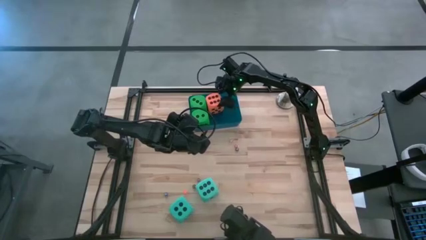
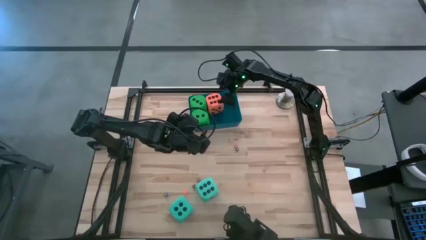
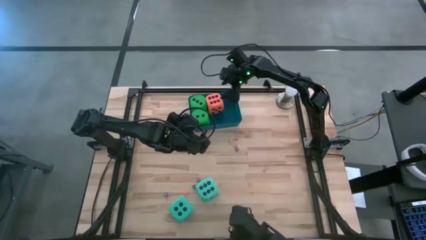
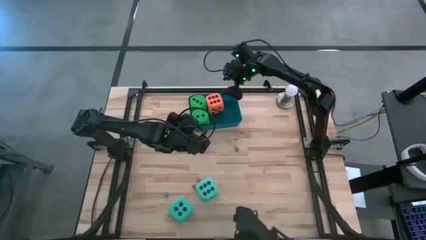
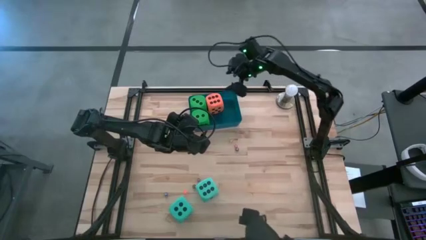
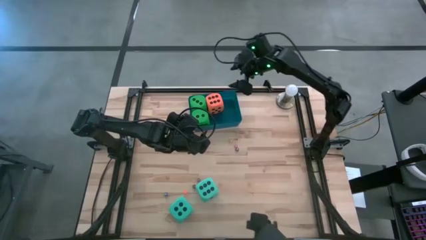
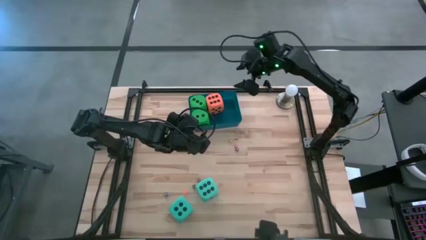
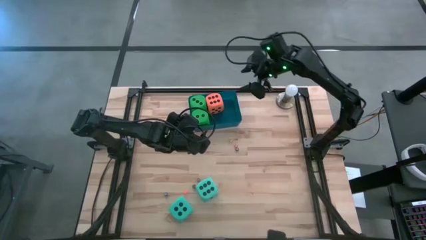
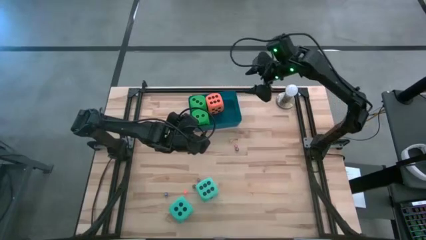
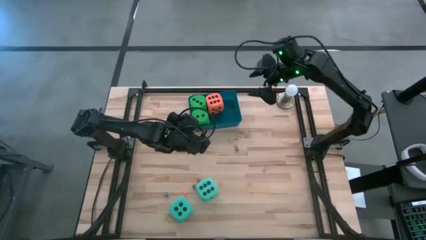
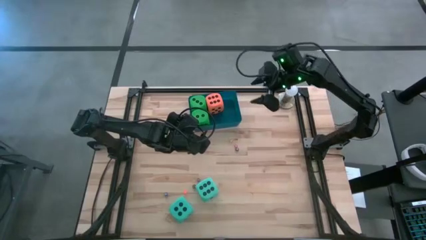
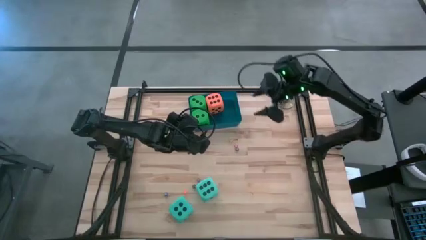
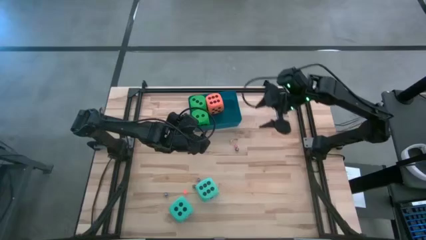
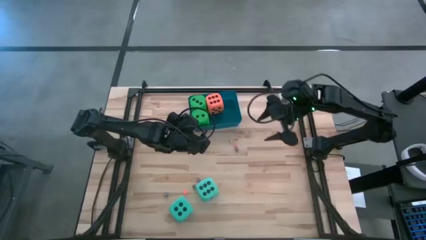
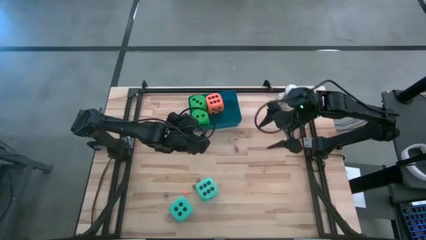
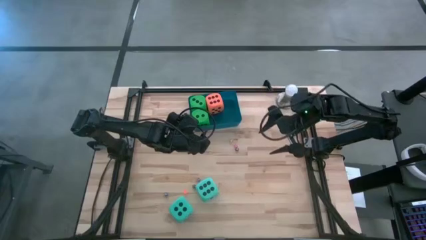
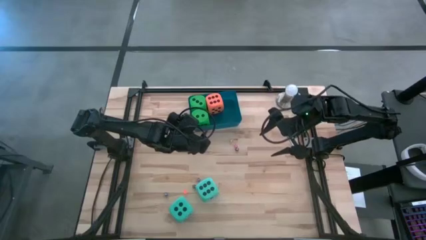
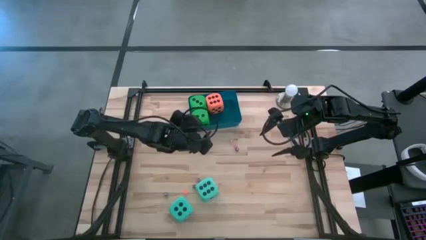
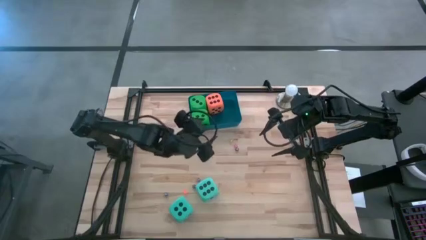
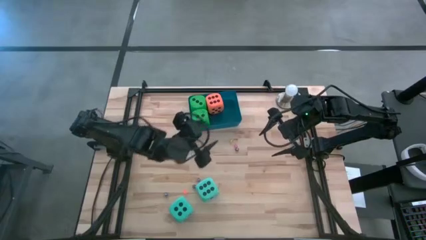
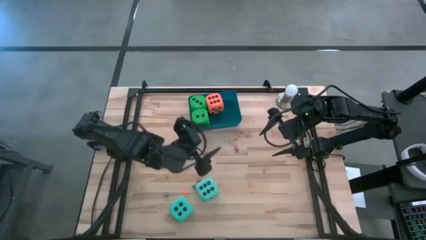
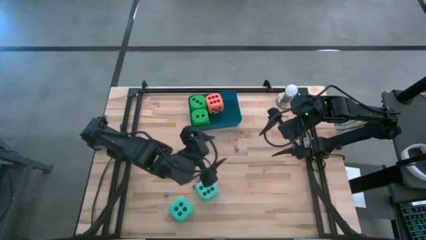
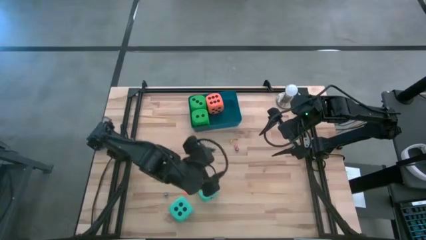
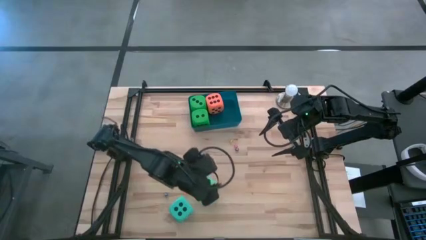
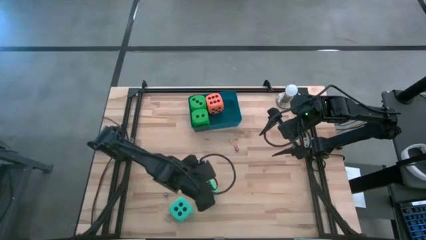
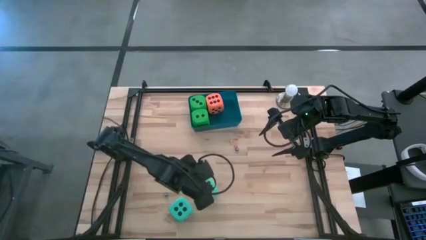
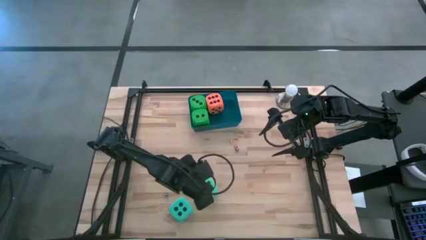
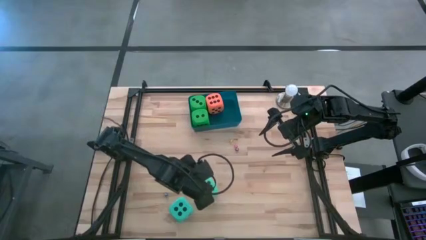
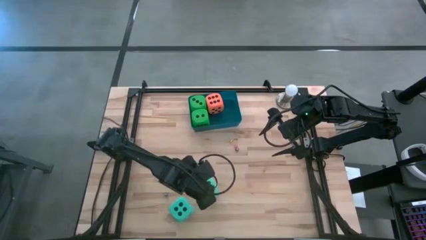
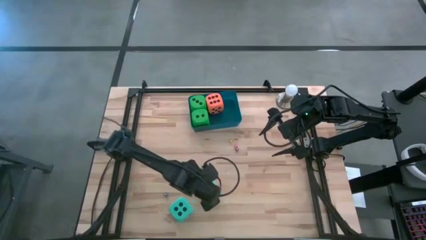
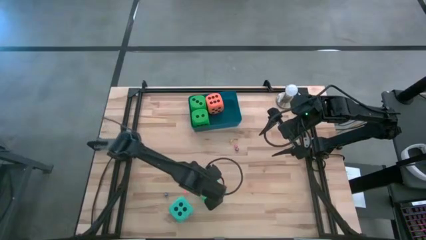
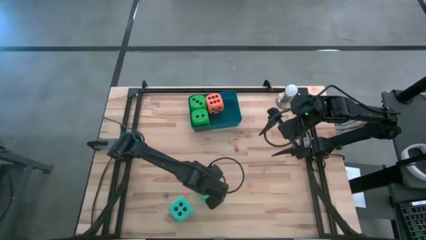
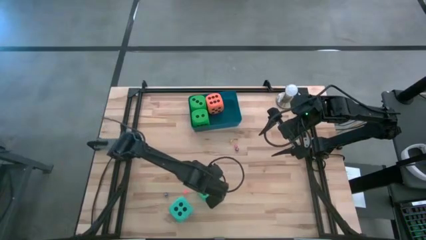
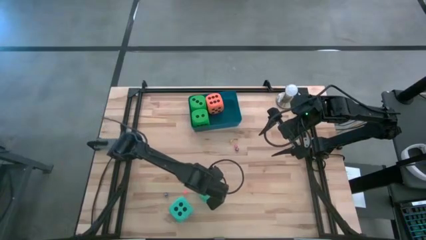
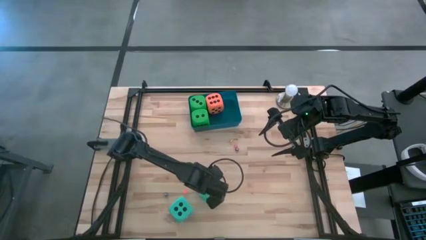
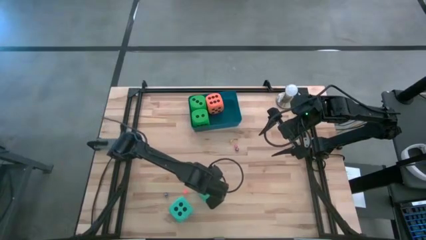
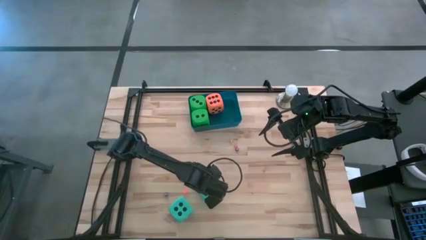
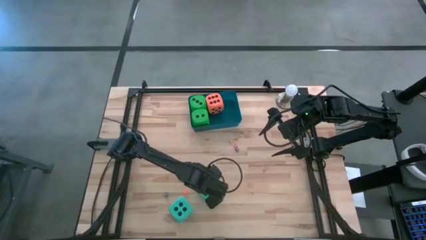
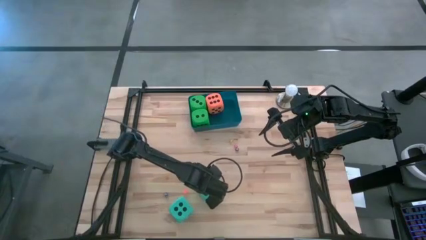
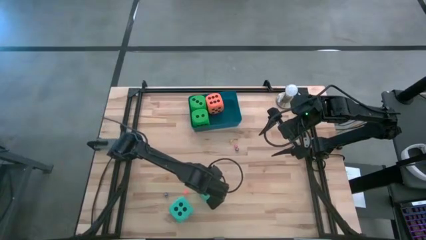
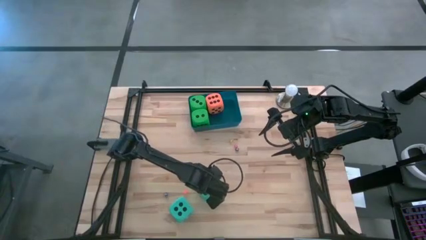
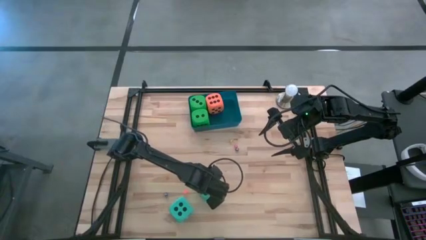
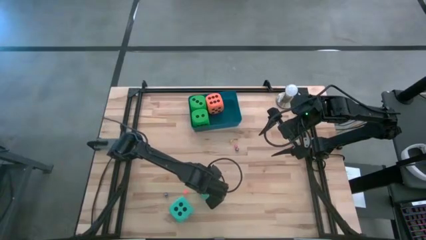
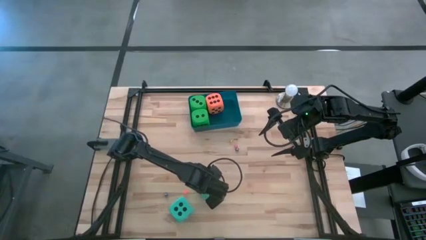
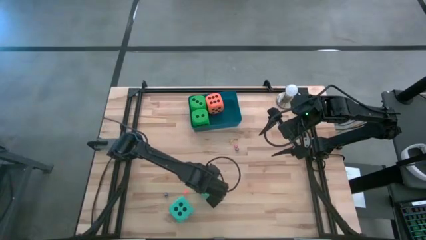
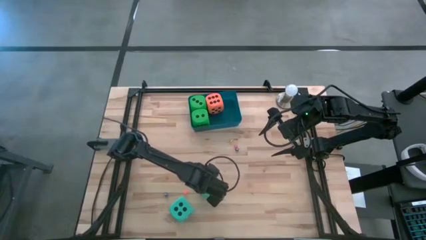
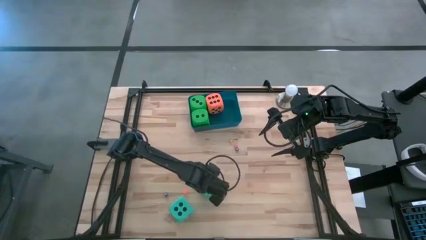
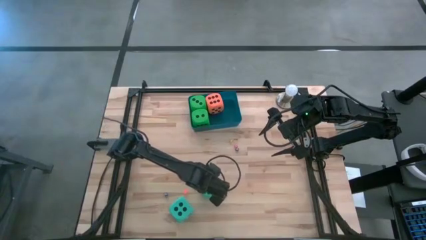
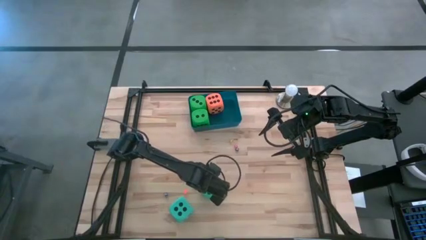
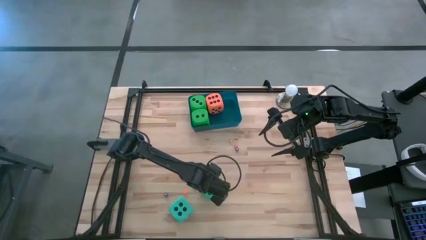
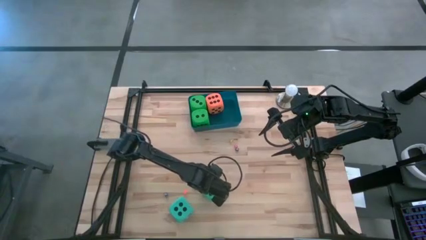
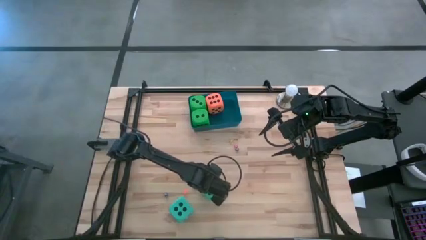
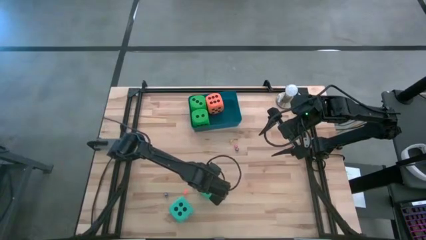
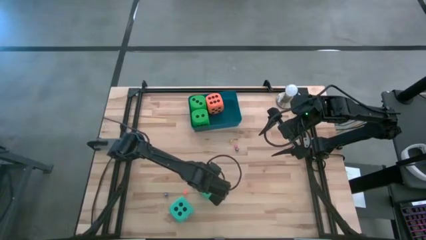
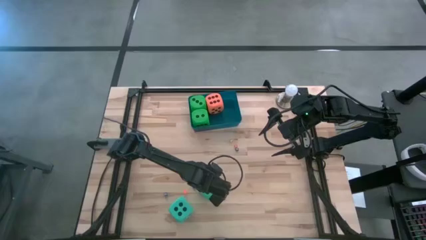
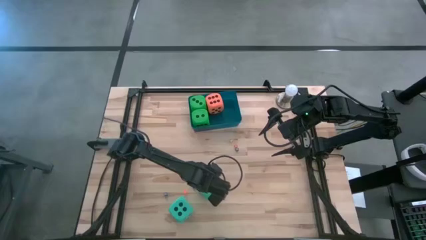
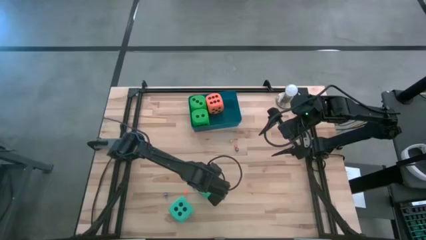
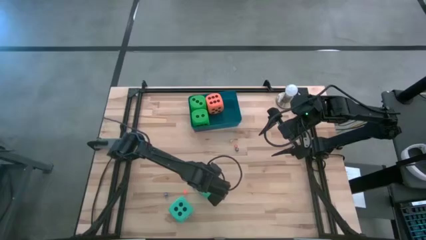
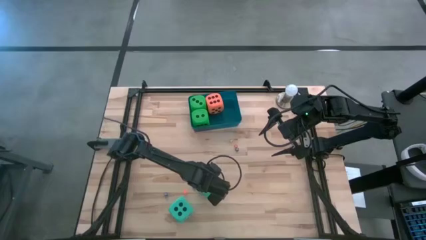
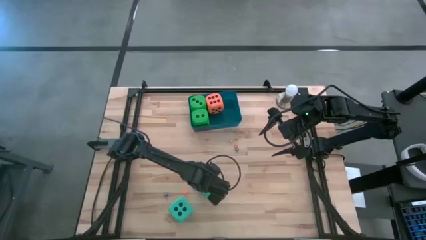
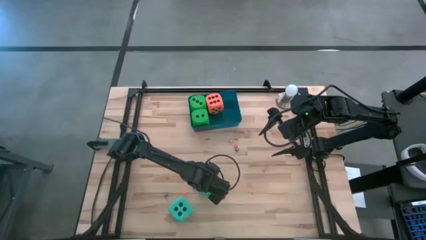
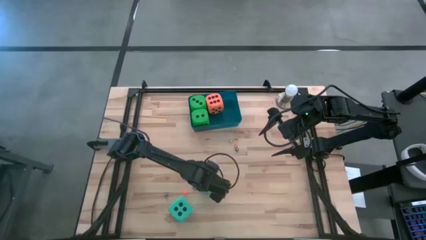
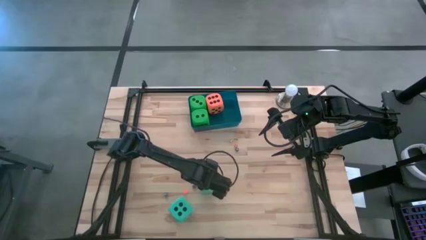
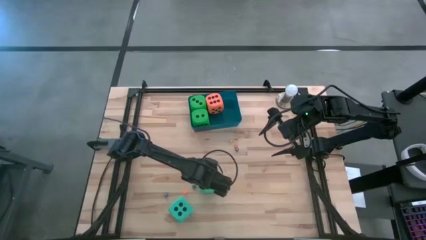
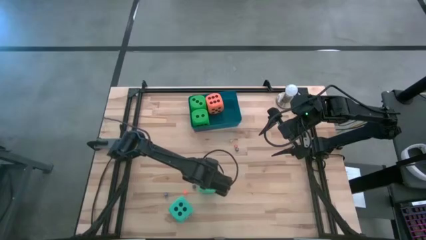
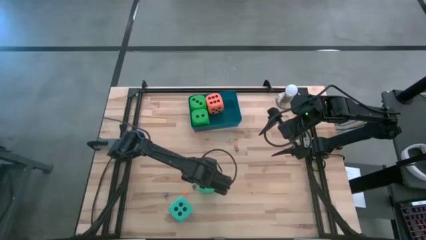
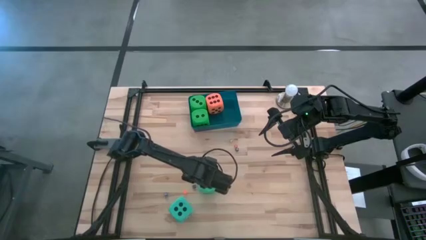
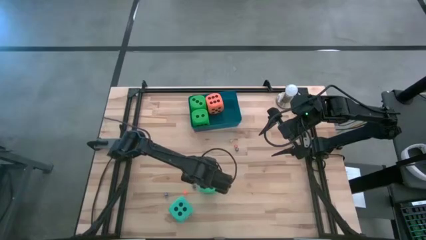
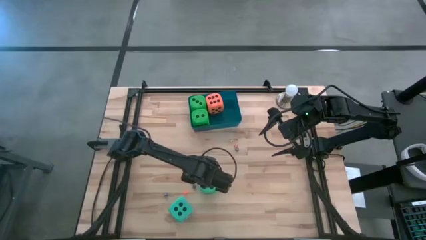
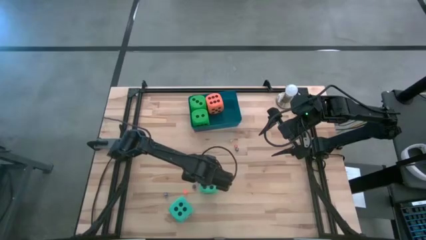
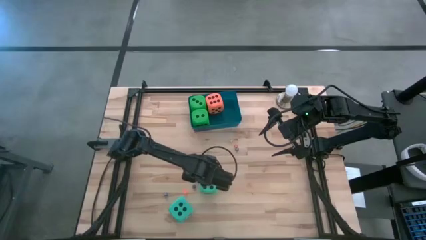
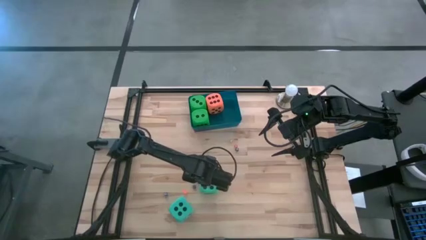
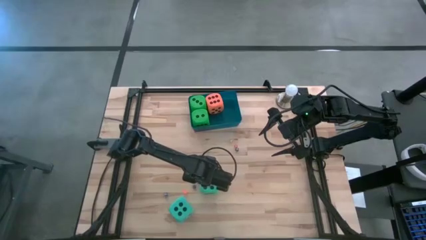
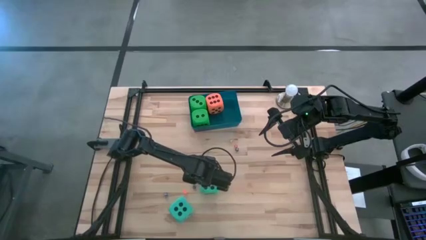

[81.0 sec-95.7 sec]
Task: Pick & Place Dice
Put the top blue dice into the blue bin
